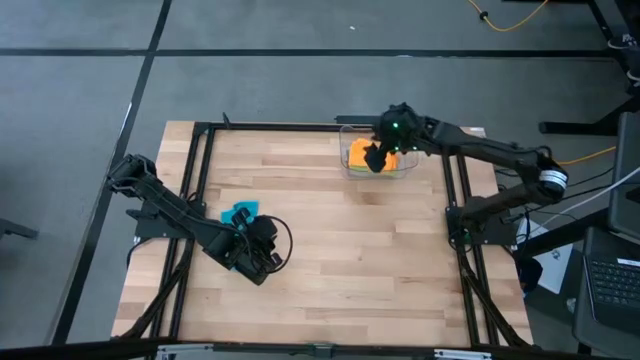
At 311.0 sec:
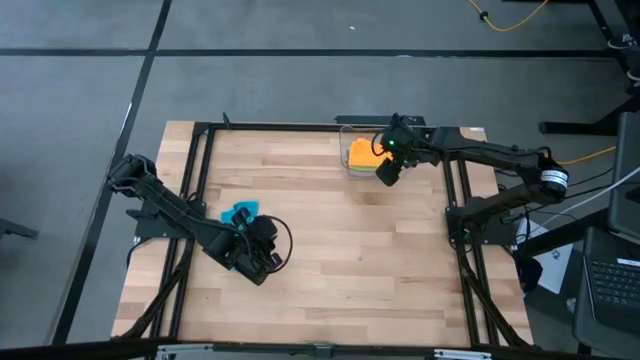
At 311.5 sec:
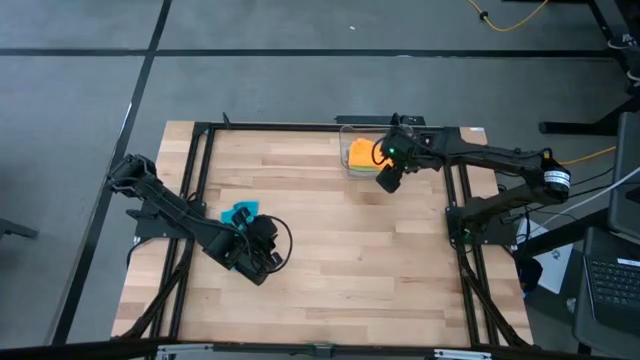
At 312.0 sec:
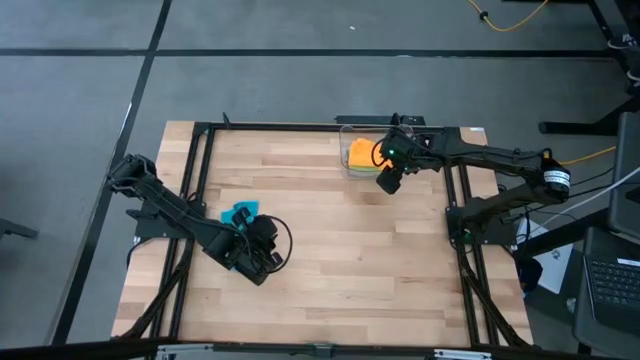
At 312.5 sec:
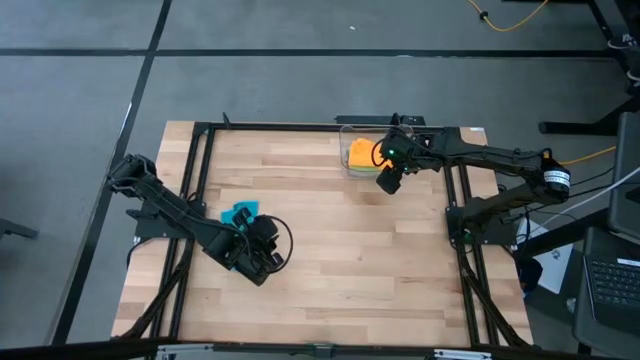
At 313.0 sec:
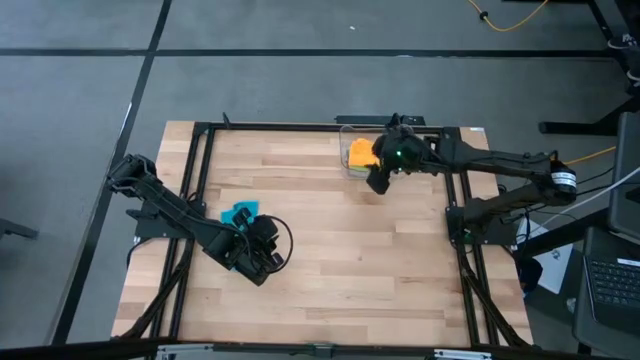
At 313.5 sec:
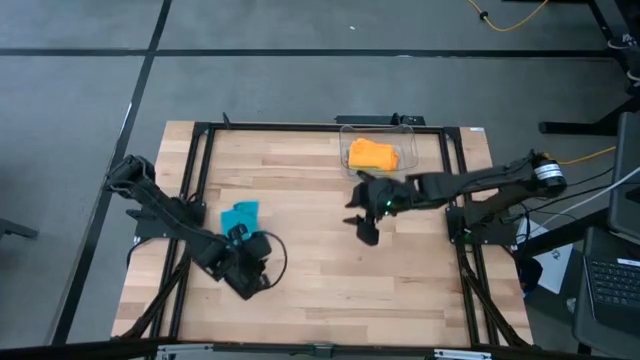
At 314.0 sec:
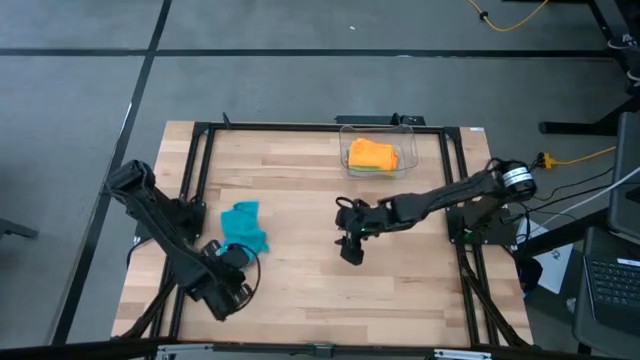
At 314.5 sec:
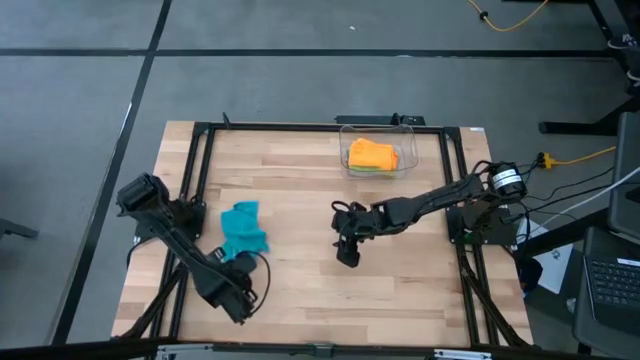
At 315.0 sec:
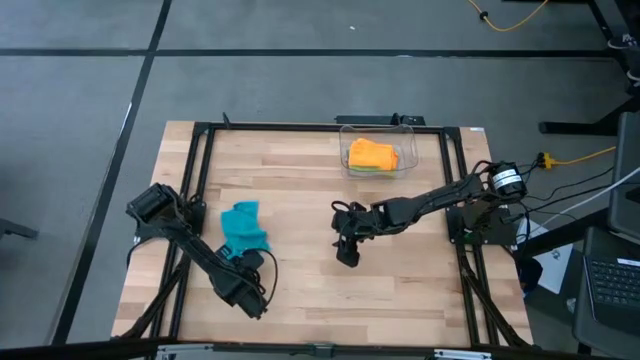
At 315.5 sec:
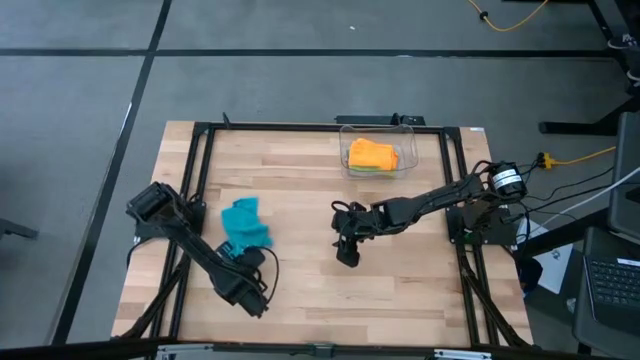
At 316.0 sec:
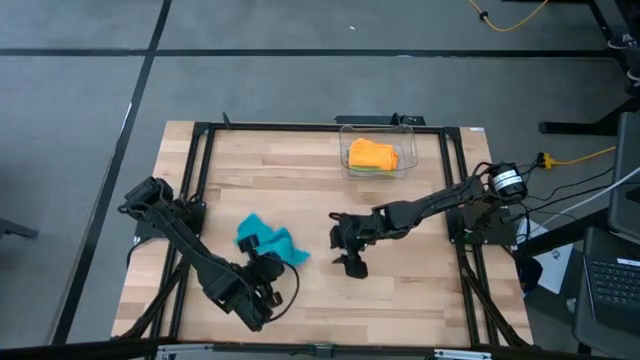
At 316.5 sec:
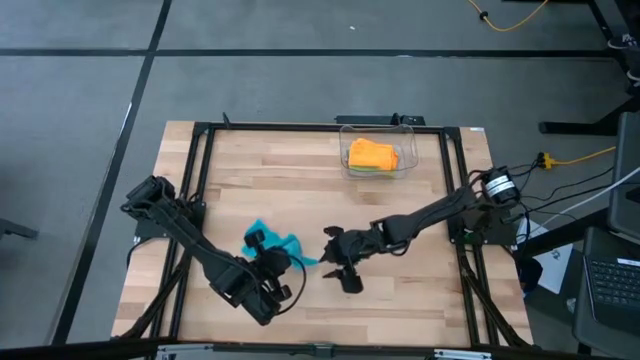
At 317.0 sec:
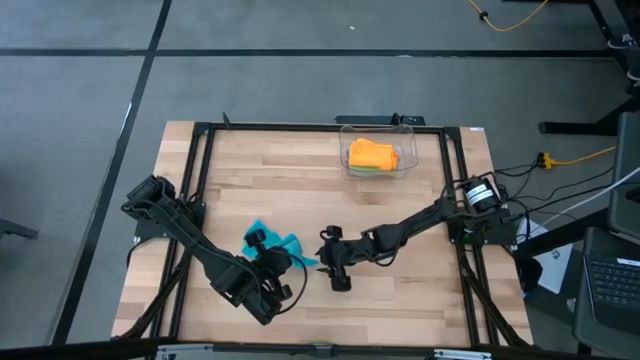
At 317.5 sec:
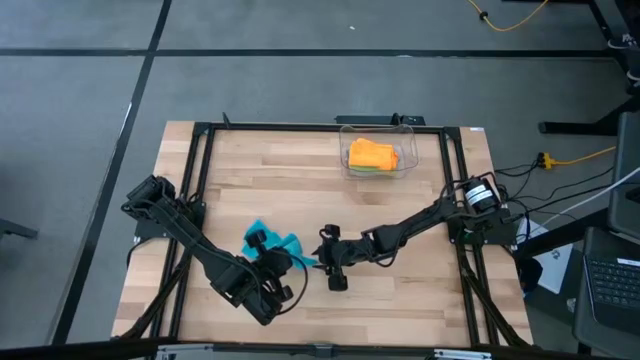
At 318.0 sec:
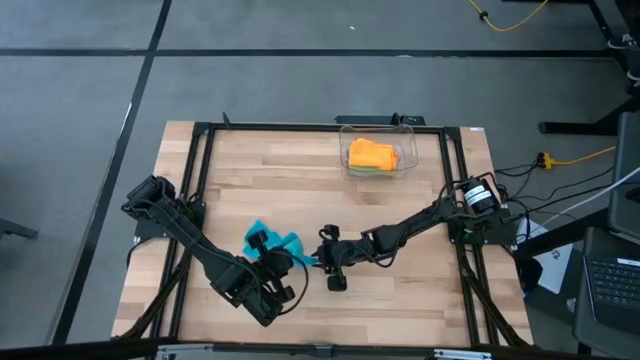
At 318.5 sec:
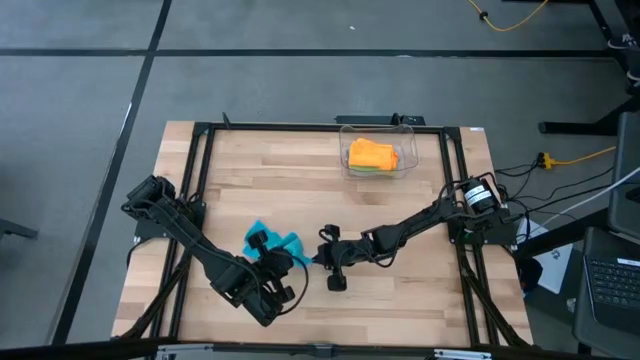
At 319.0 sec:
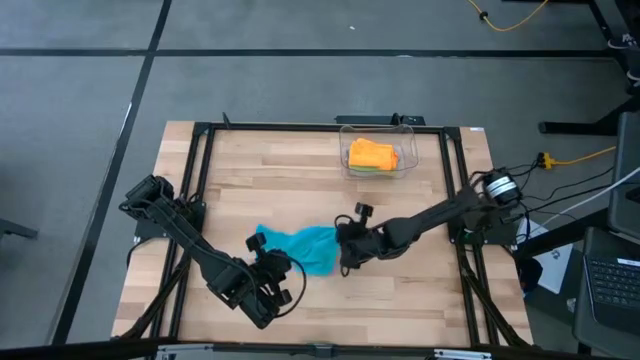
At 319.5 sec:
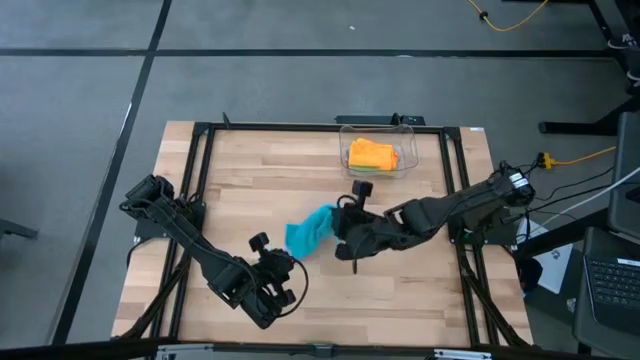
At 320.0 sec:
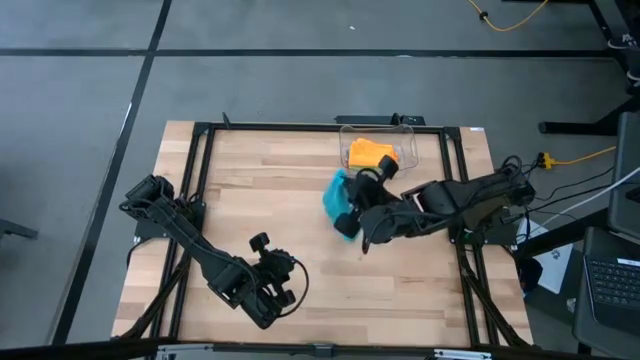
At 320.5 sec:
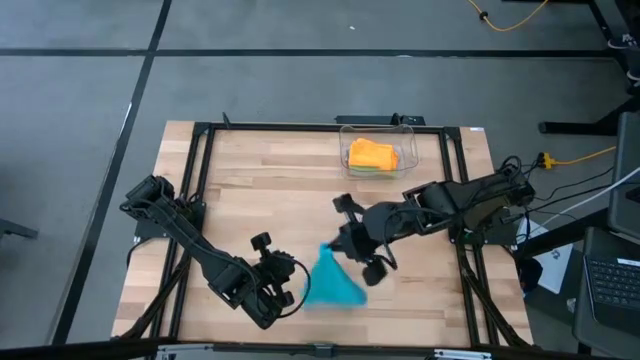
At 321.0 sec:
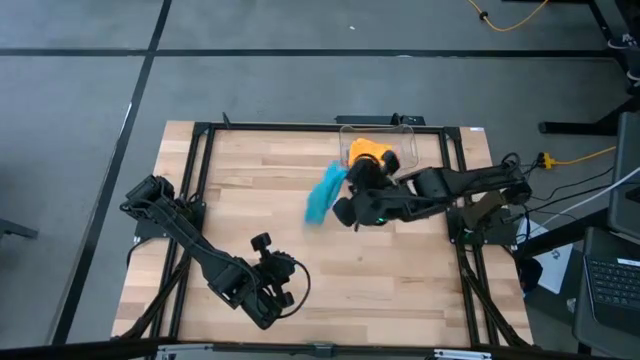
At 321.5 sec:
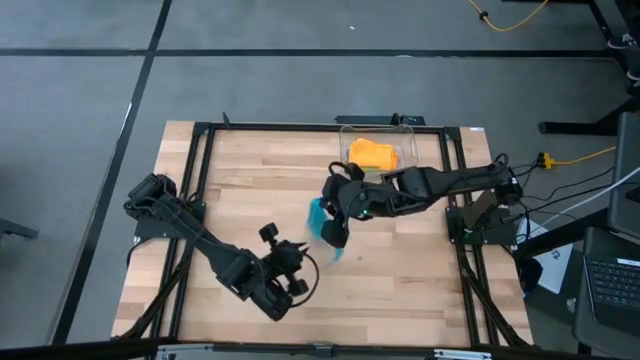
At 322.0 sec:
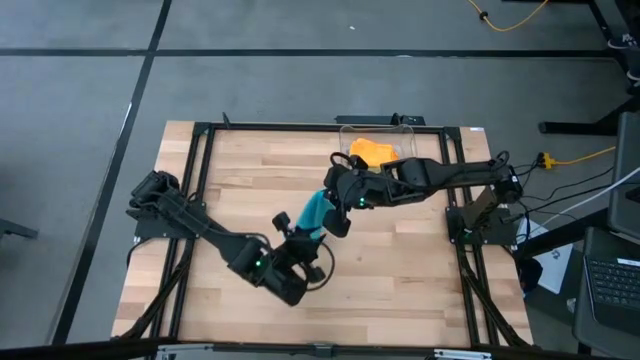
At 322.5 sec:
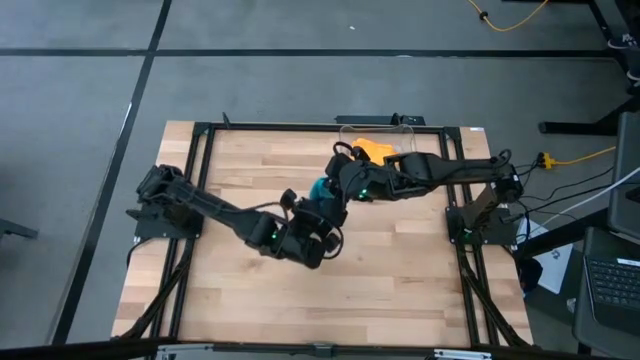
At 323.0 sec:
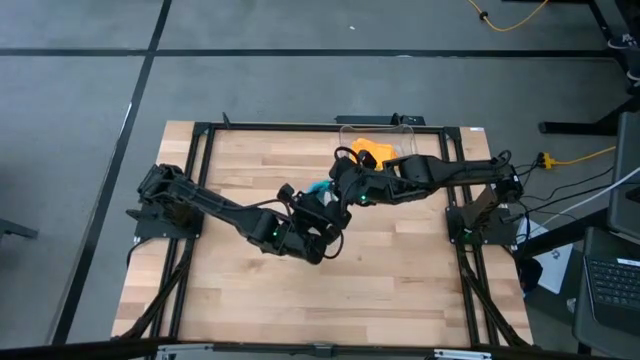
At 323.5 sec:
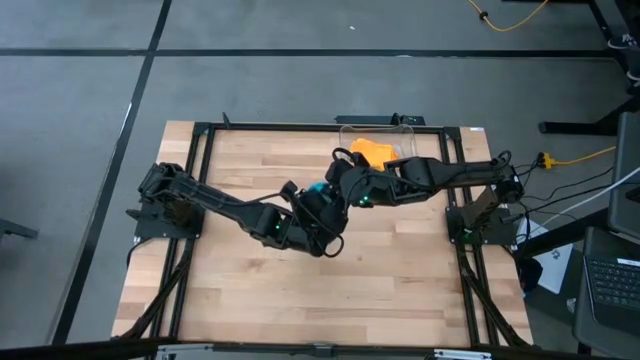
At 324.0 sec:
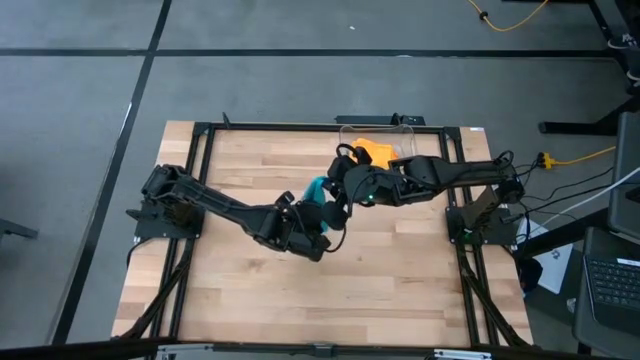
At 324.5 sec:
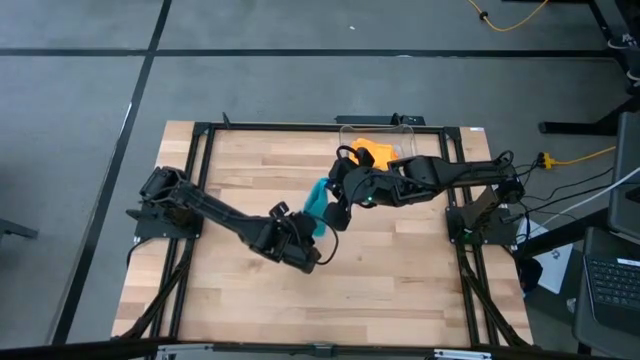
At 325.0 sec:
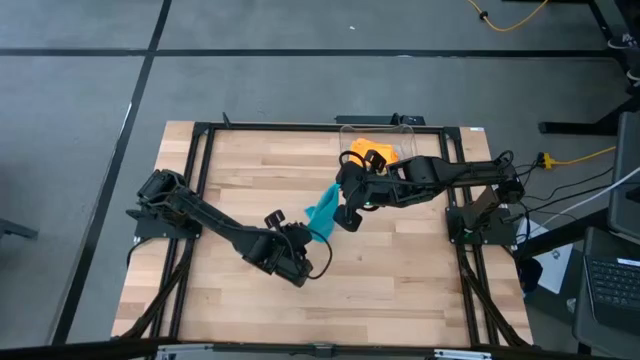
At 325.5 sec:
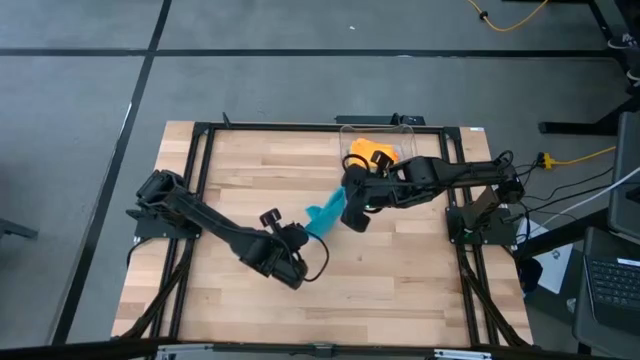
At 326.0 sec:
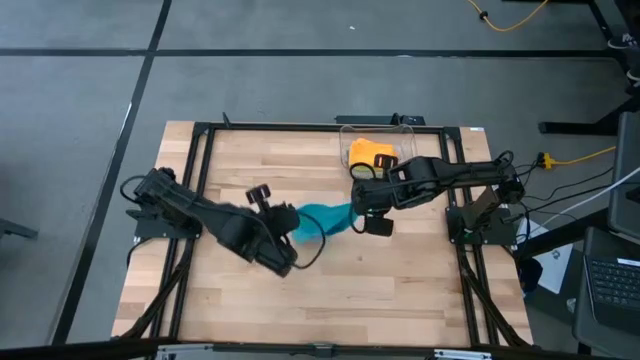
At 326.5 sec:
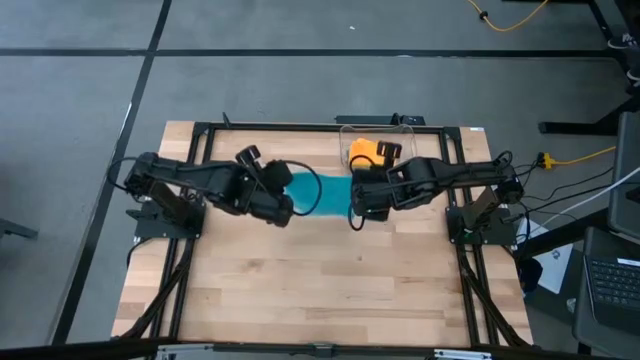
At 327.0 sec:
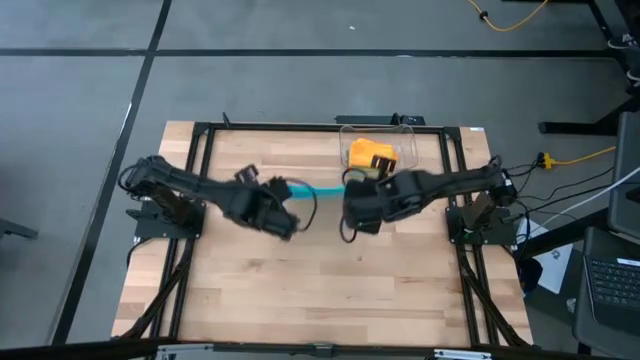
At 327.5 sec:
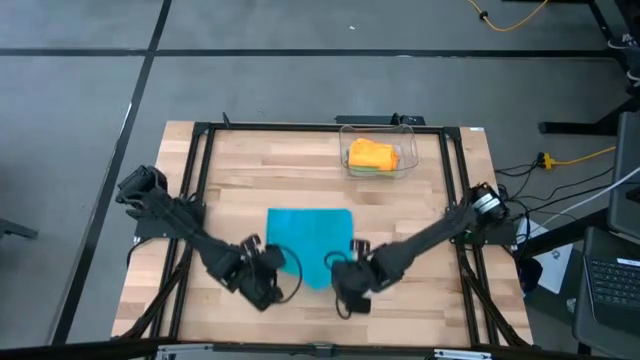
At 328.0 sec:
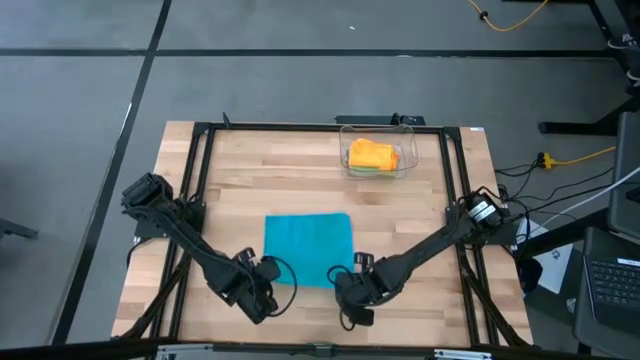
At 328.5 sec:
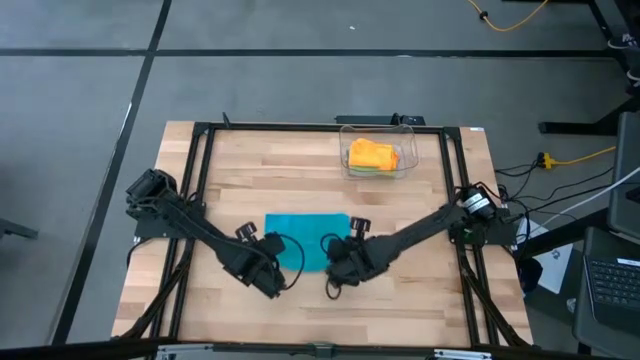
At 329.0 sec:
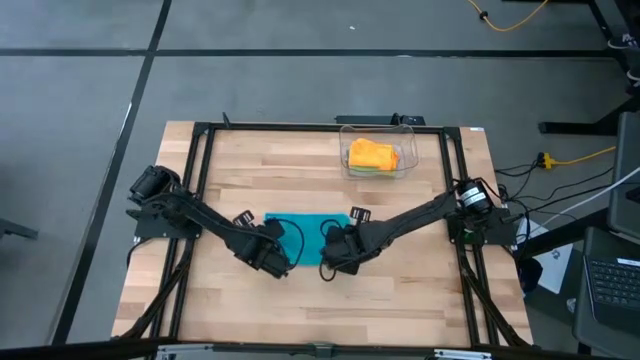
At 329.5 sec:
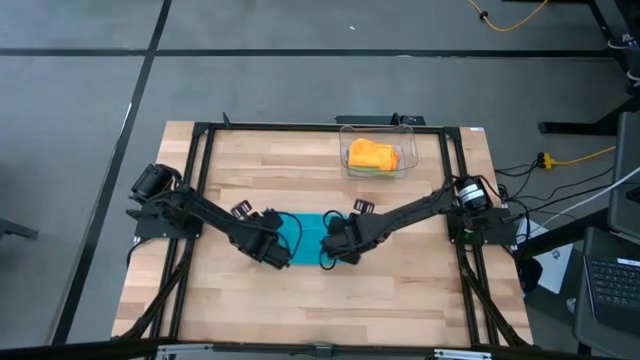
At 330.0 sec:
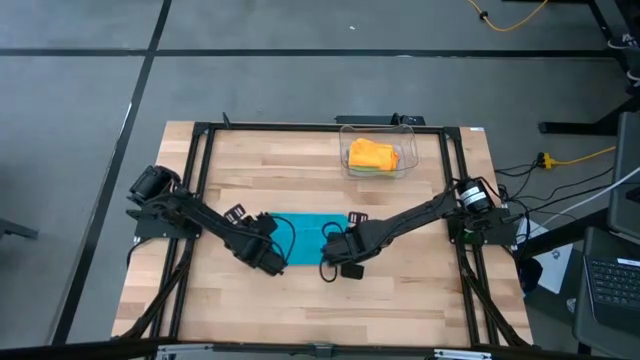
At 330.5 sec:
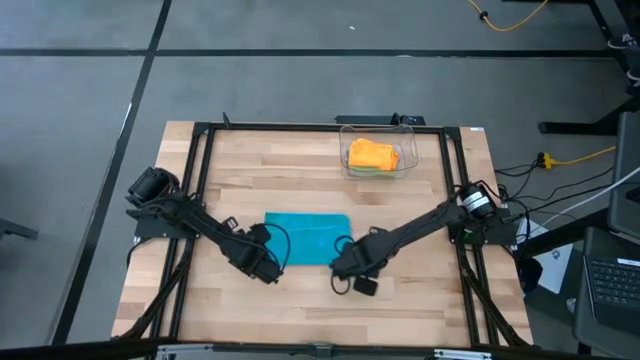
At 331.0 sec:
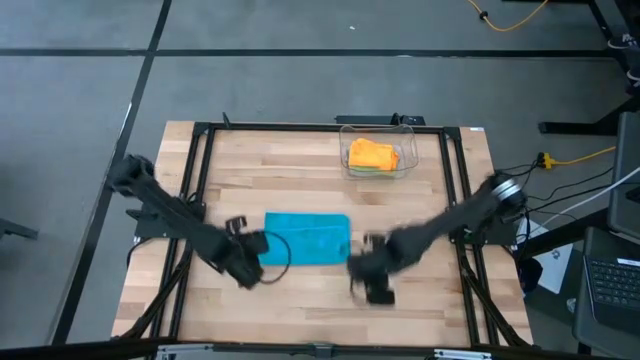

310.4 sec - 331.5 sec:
Task: Fold microfiber towels
Fold the blue microfiber
